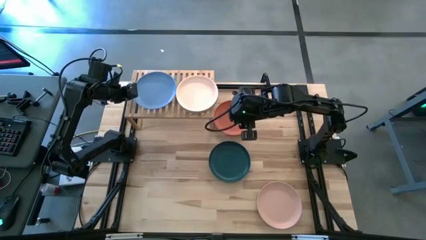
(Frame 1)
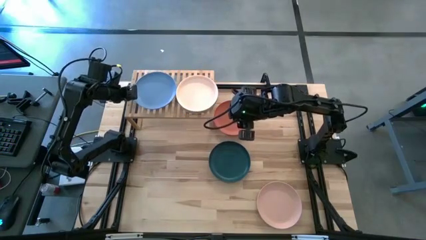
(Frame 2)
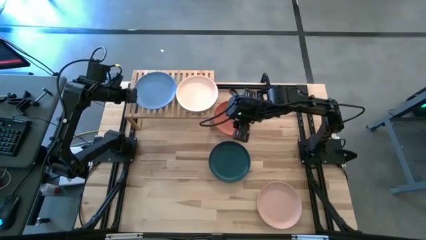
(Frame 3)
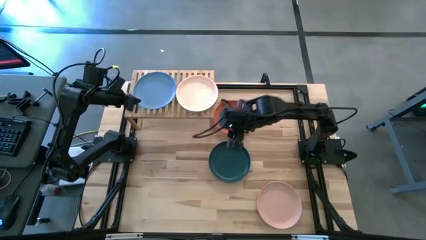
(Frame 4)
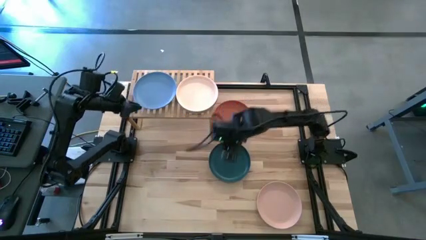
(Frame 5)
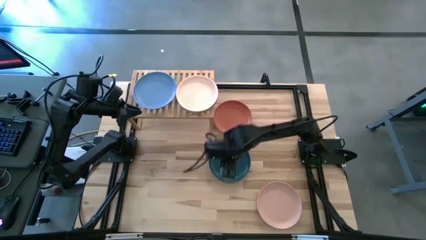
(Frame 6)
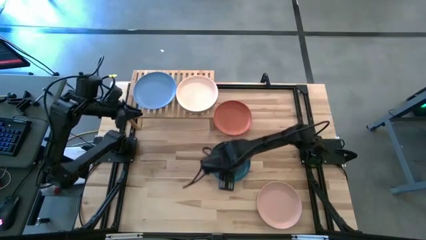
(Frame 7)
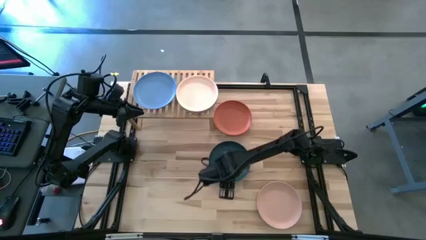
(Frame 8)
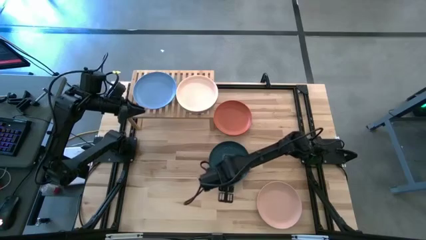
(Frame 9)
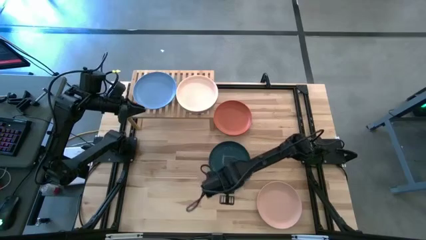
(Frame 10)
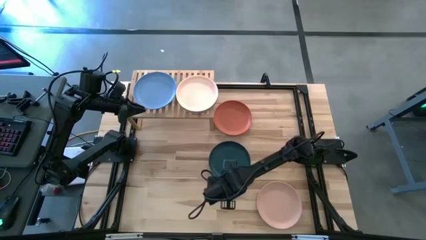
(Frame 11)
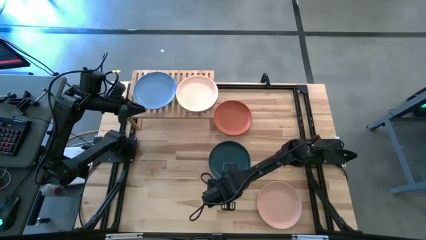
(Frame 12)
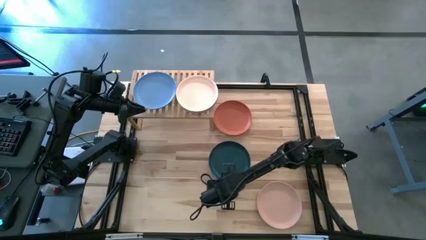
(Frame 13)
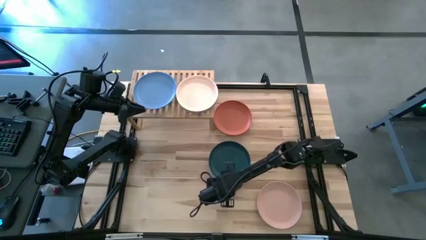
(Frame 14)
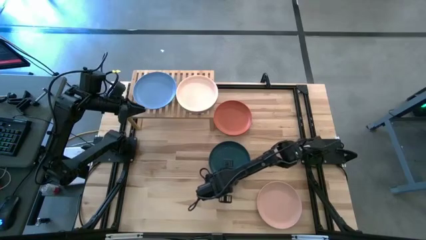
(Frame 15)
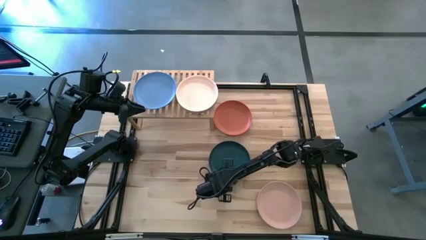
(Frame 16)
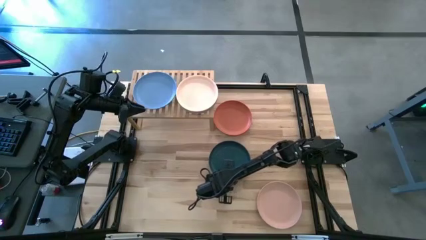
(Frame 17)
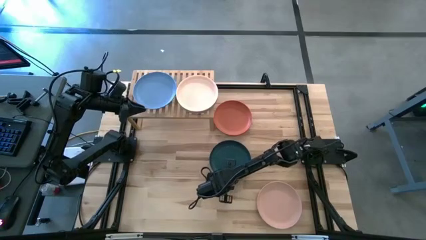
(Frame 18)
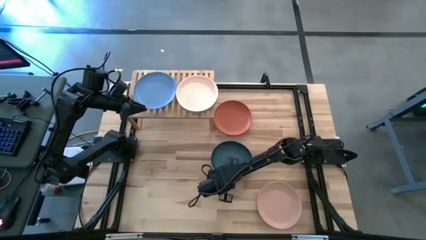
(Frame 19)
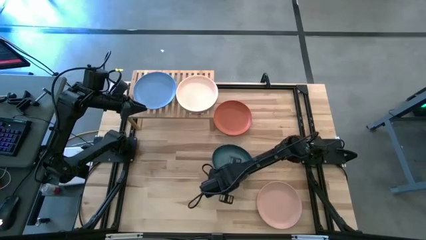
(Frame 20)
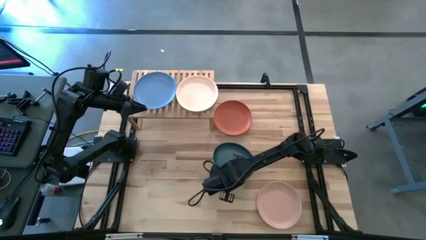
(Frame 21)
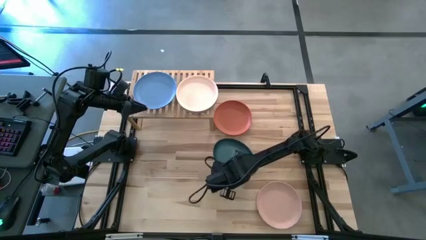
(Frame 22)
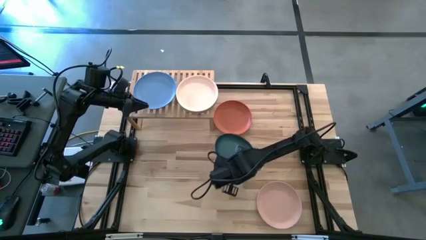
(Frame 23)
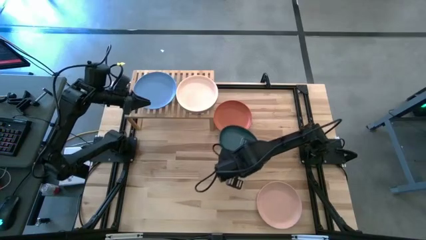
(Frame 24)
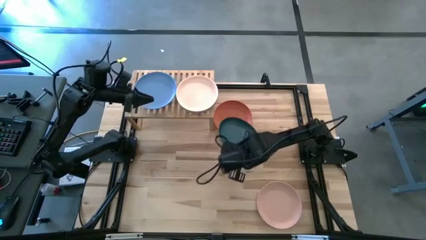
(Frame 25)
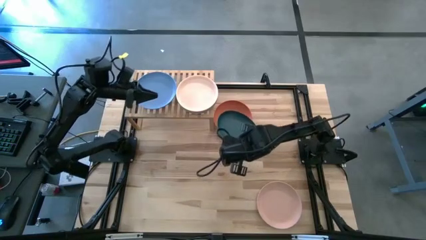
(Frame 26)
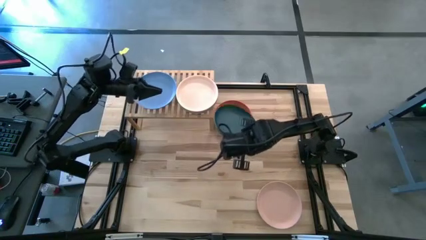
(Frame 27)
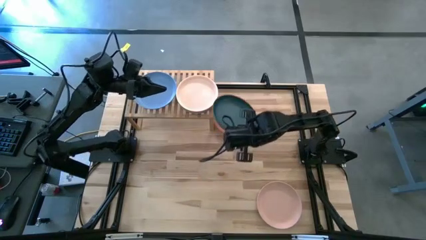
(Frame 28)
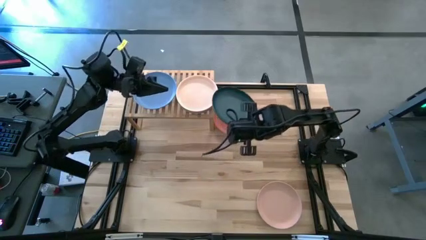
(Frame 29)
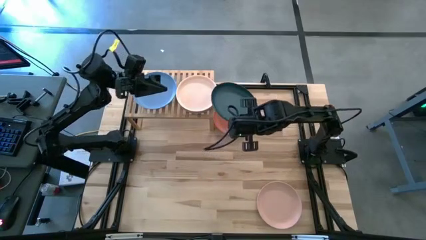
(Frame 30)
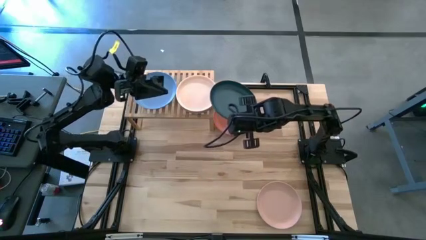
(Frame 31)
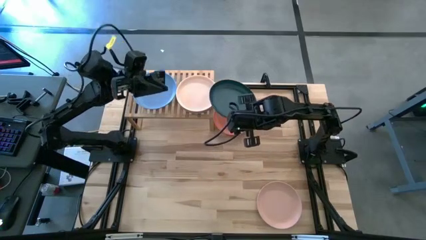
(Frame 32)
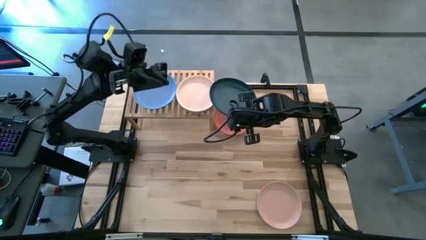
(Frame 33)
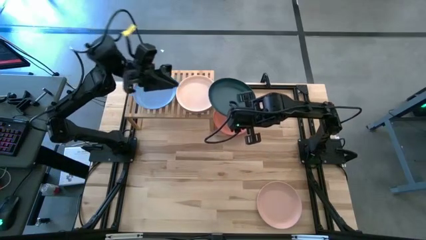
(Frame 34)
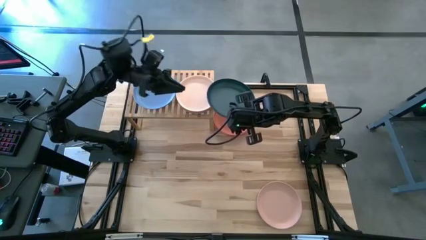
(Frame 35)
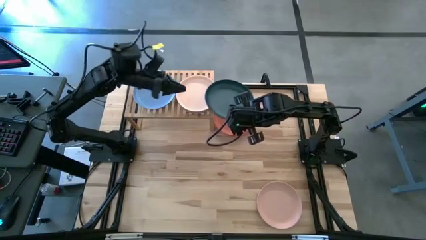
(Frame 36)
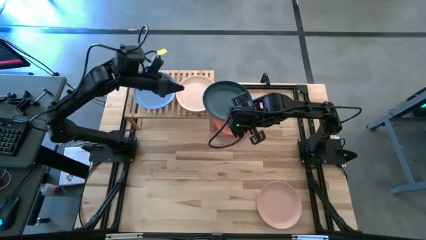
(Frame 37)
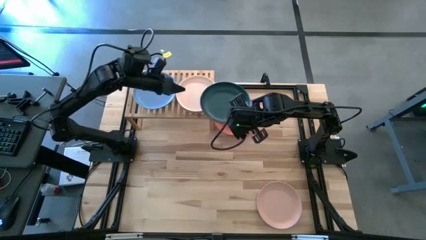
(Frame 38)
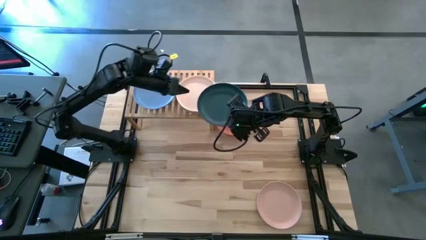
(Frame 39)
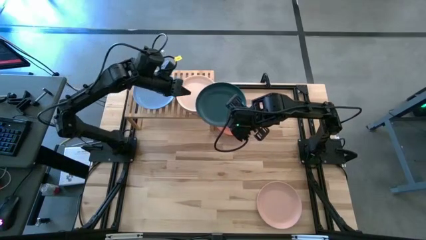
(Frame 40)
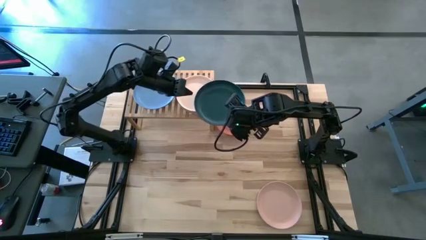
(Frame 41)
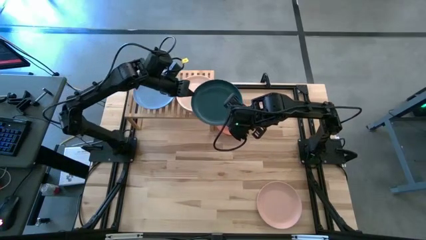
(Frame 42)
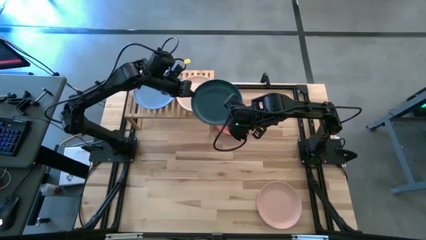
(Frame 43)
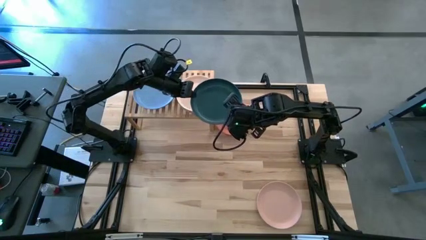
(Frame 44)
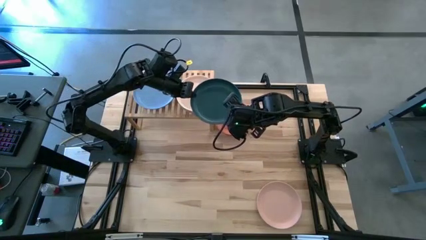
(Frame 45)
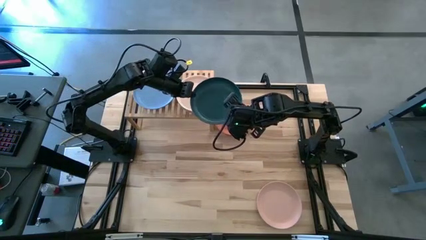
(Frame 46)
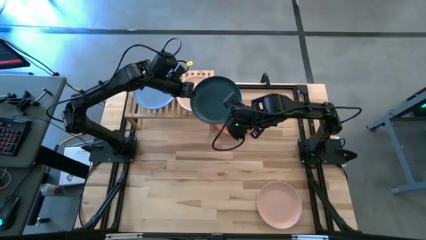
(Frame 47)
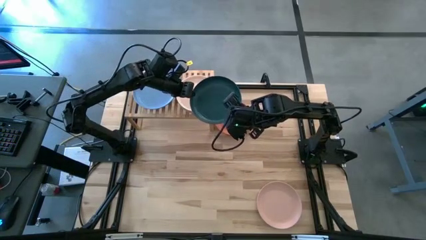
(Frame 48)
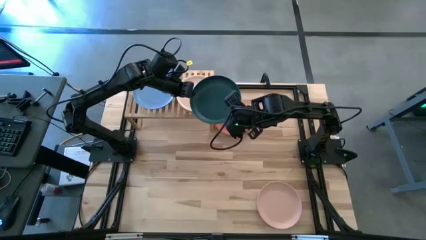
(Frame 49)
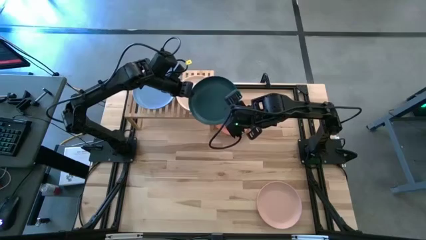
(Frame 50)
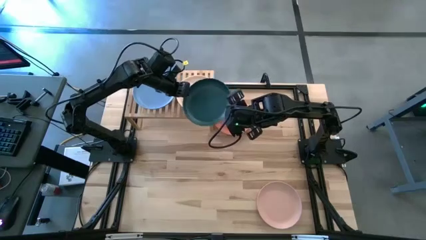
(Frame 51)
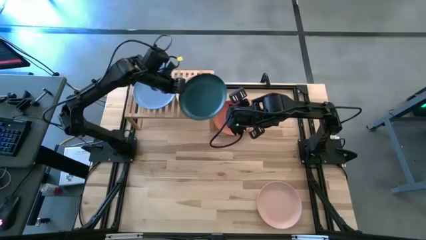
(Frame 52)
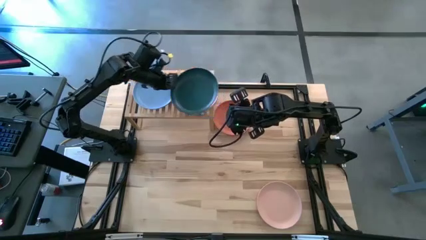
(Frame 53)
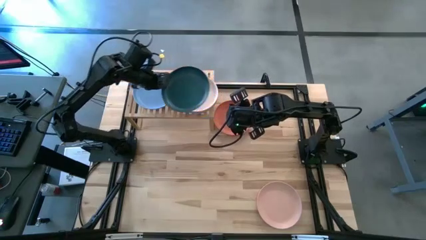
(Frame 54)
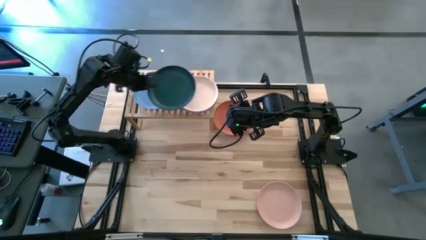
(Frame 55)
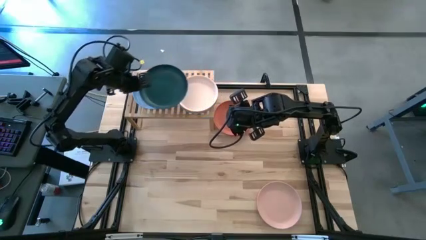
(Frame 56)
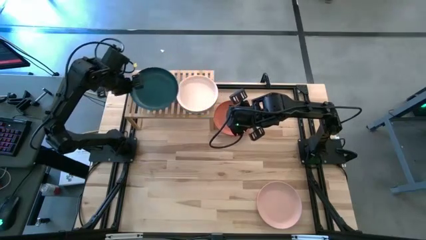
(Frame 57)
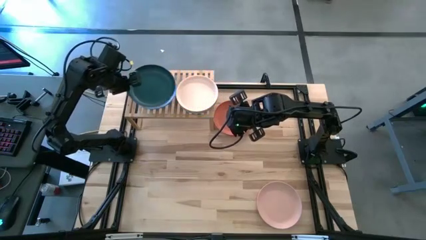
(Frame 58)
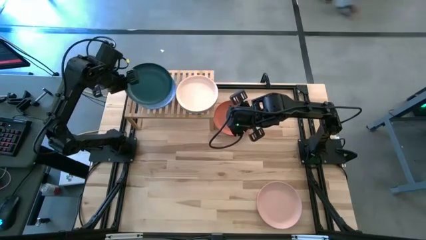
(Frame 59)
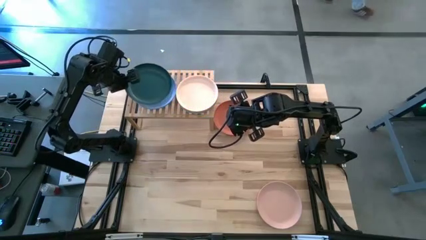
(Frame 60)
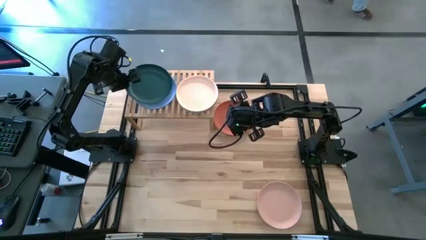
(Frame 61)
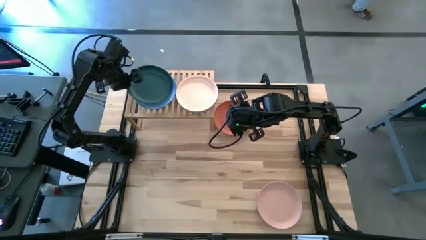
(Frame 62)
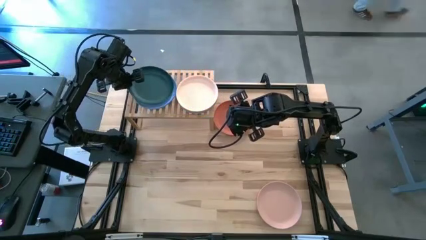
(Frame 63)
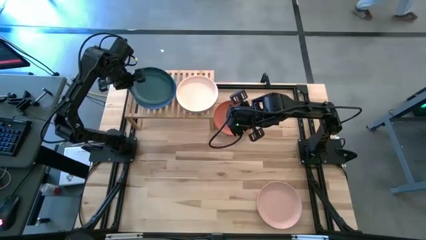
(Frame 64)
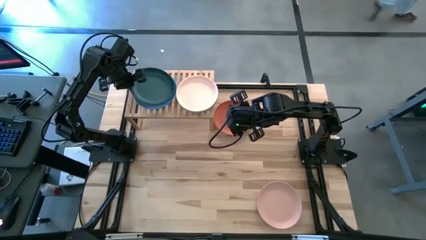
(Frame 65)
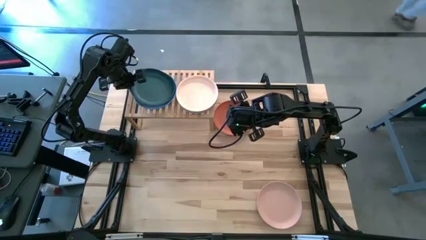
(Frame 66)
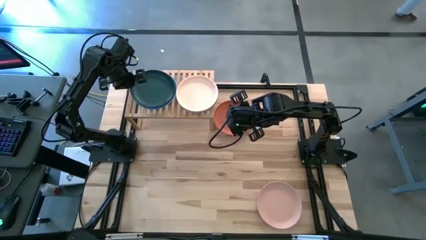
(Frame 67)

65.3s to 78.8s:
Task: Place and stack plates onto a shelf
Stack the black plate on top of the blue plate on the shelf
